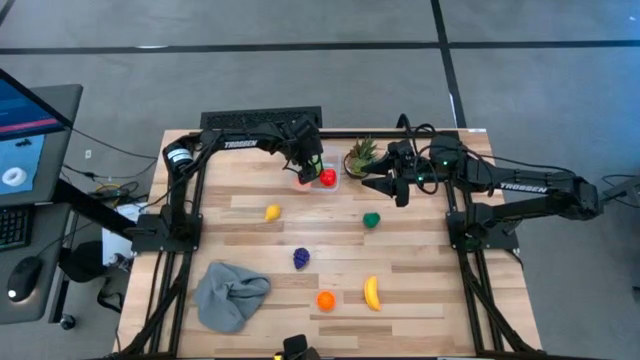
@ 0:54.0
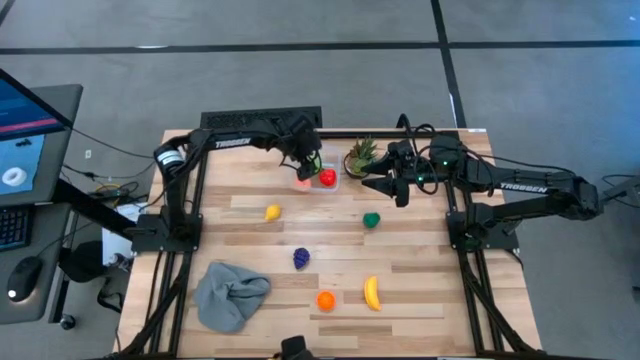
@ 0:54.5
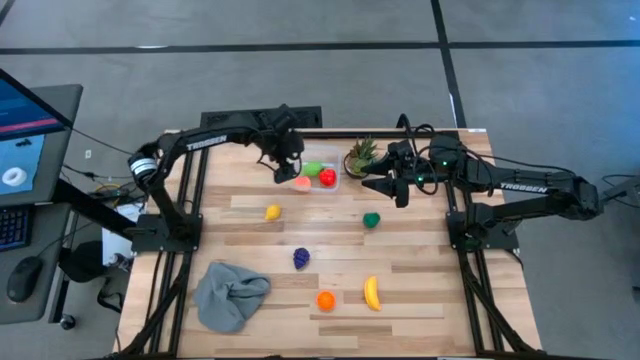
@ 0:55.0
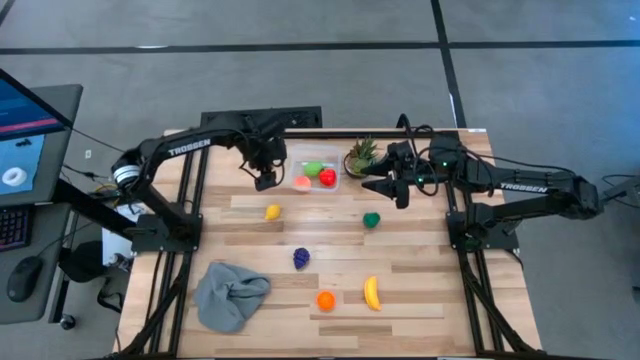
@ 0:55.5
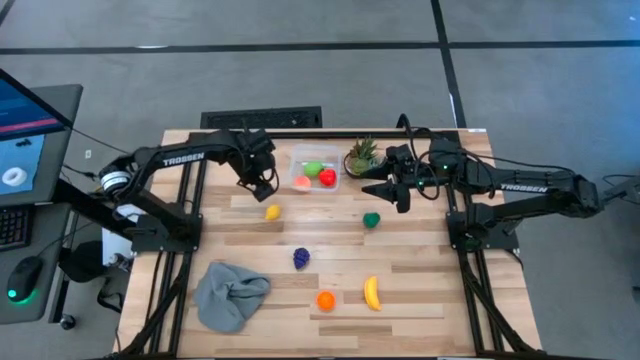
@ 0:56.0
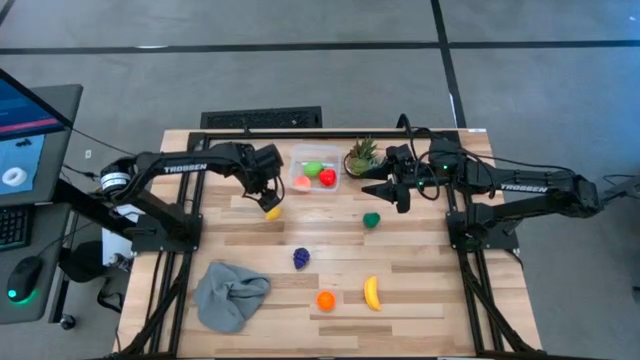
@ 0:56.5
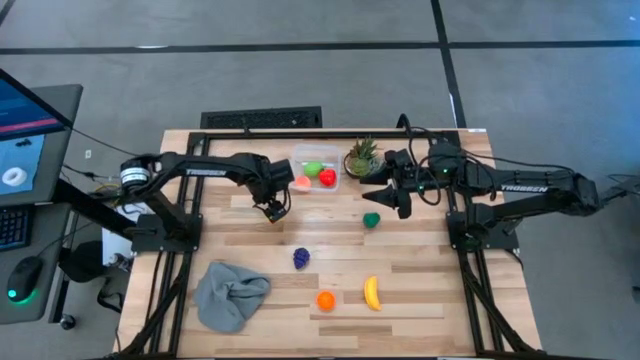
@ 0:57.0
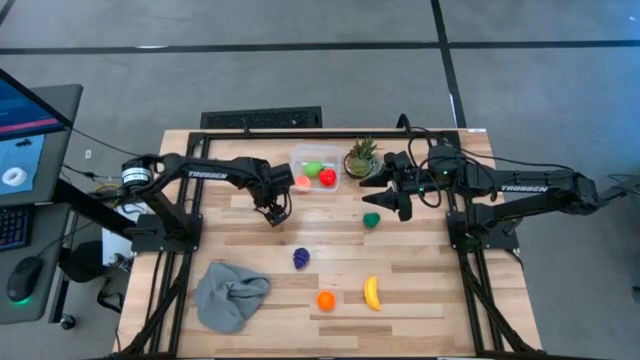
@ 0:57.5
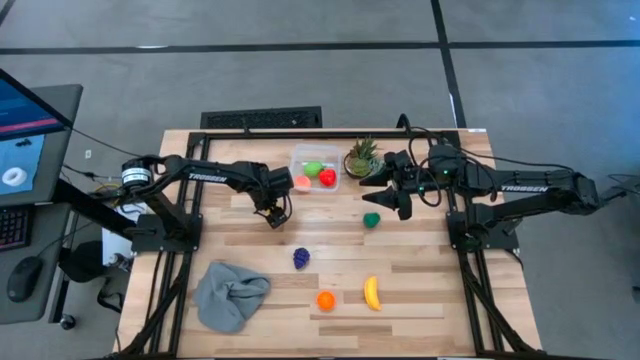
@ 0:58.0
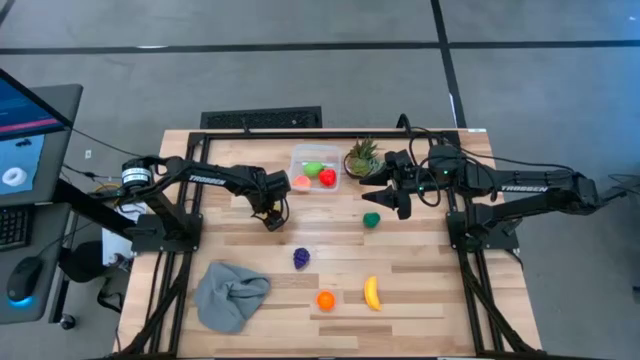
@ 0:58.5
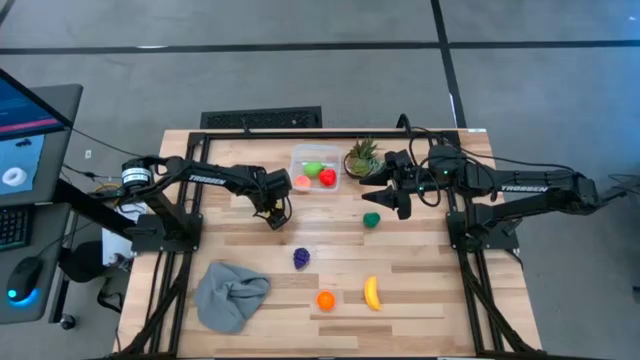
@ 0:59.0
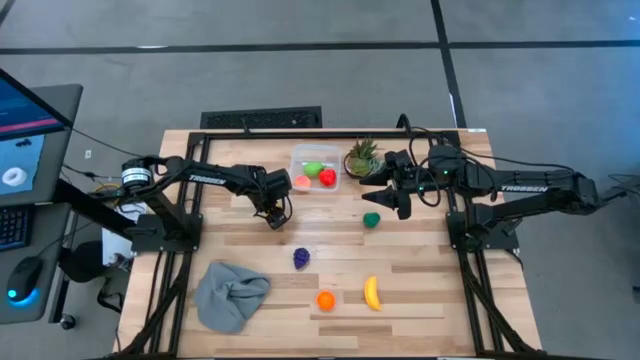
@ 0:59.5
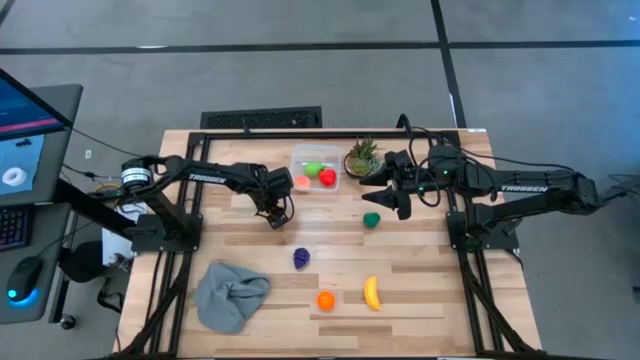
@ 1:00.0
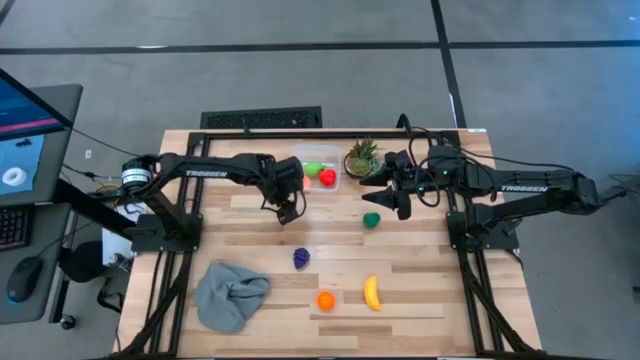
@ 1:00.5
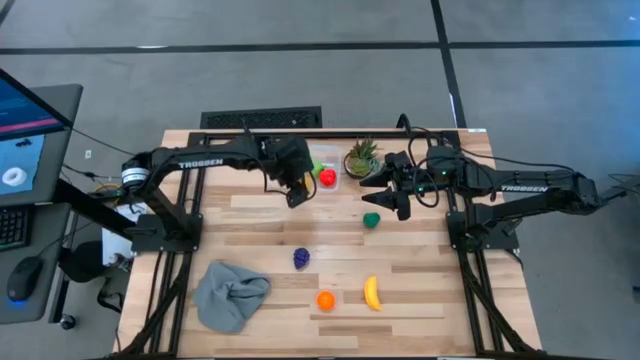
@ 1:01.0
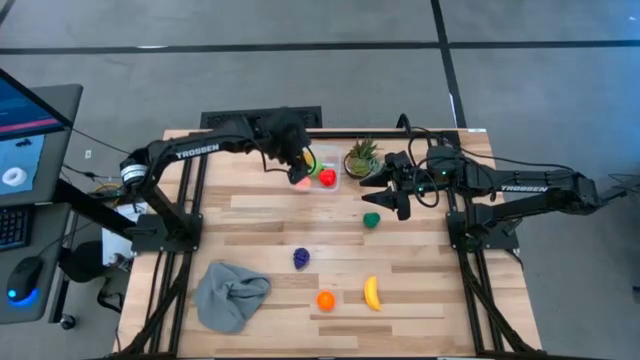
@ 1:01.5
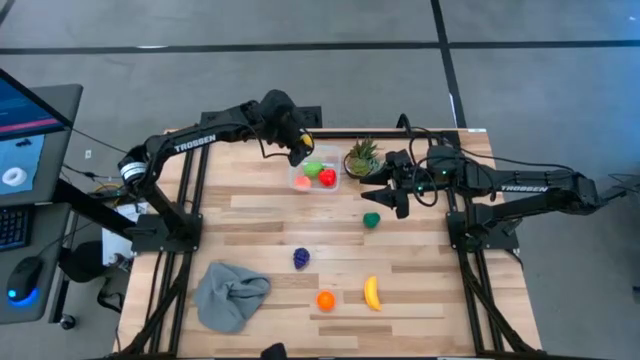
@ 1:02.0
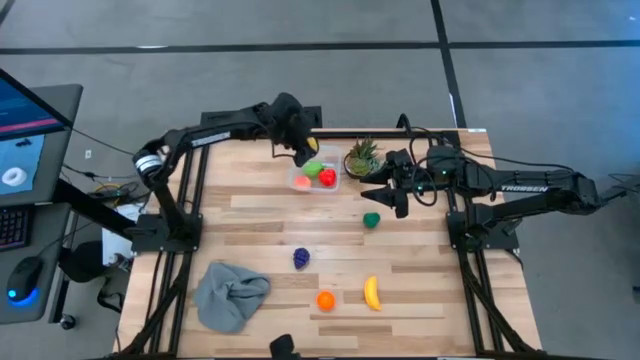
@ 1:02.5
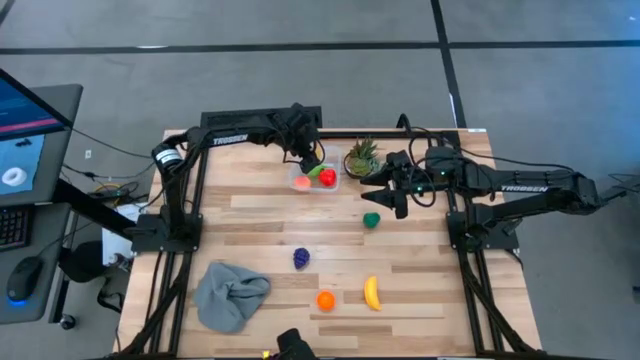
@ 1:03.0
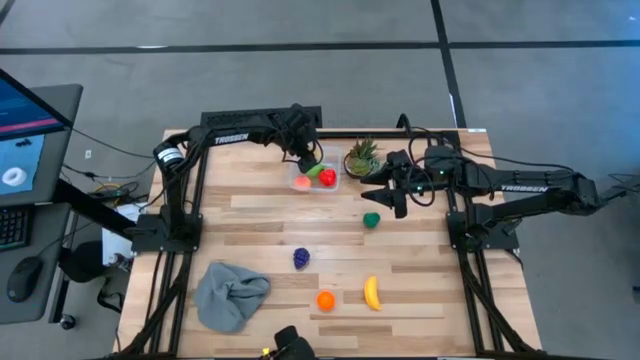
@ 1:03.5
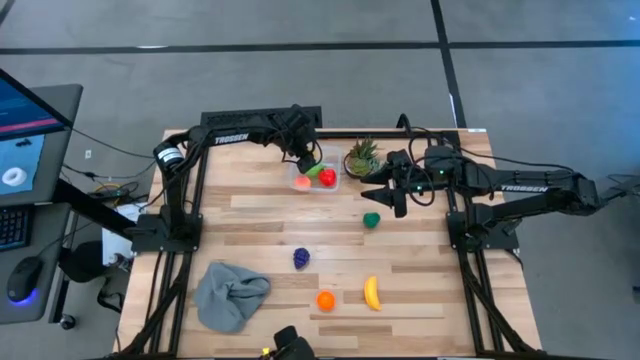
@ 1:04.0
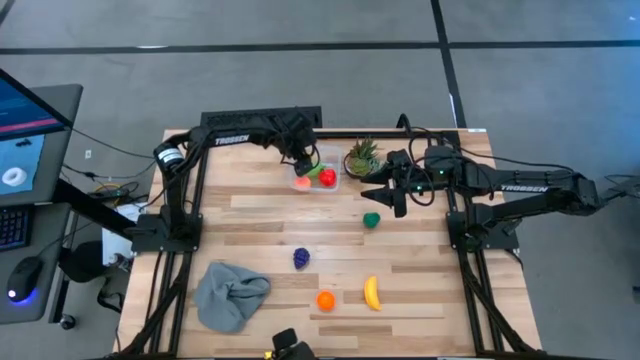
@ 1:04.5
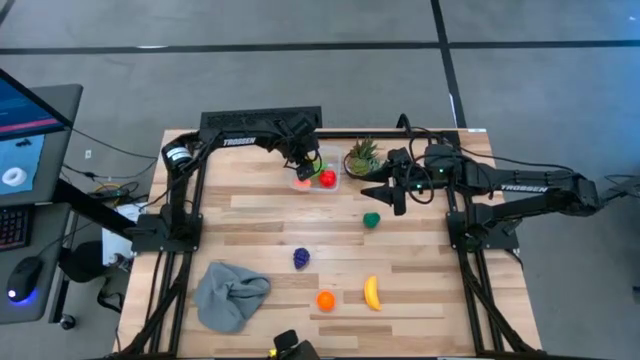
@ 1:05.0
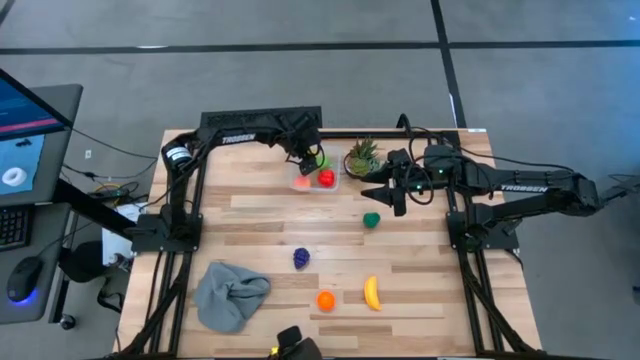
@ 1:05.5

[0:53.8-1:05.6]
Task: Pick and placing Produce into tupperware
Put the yellow lemon into the transparent container

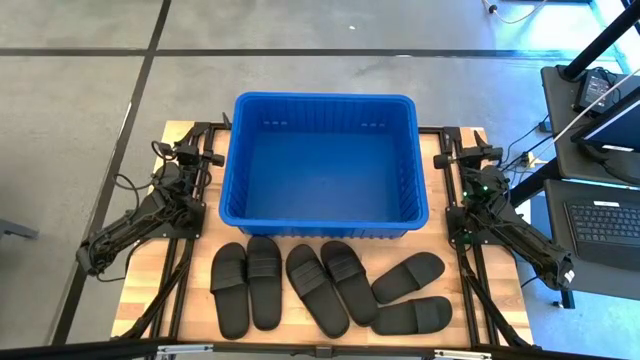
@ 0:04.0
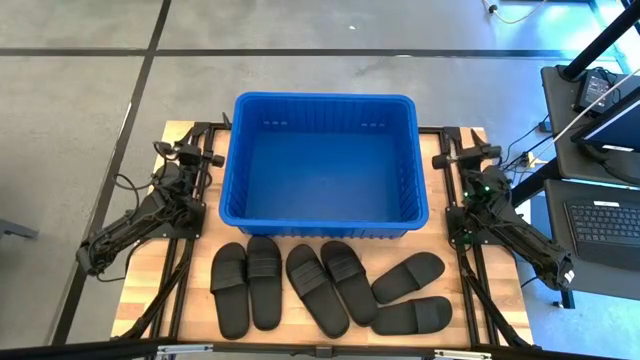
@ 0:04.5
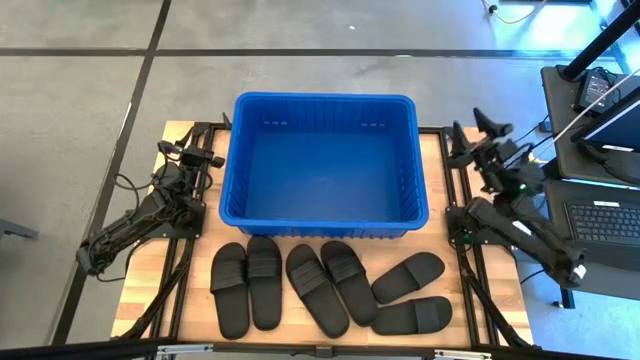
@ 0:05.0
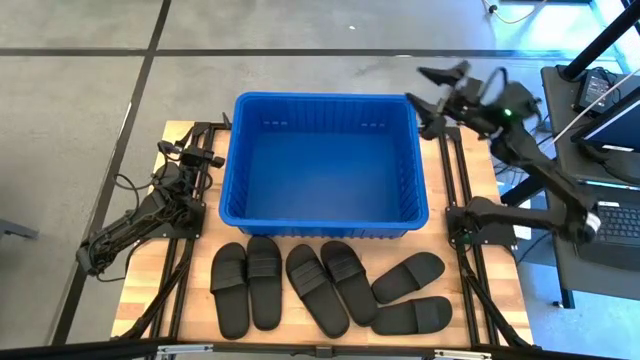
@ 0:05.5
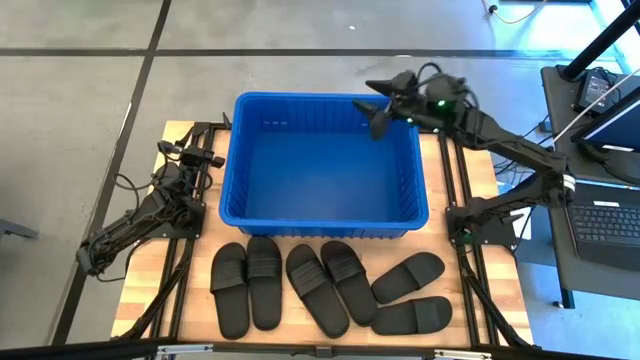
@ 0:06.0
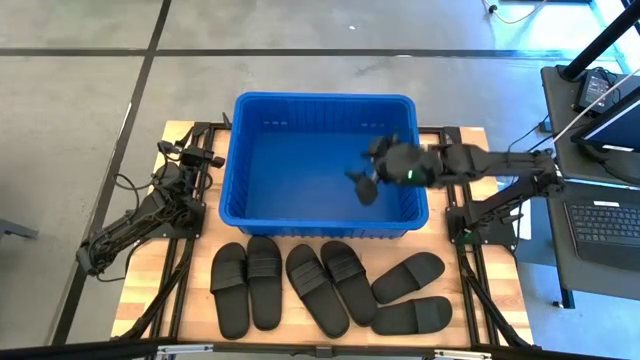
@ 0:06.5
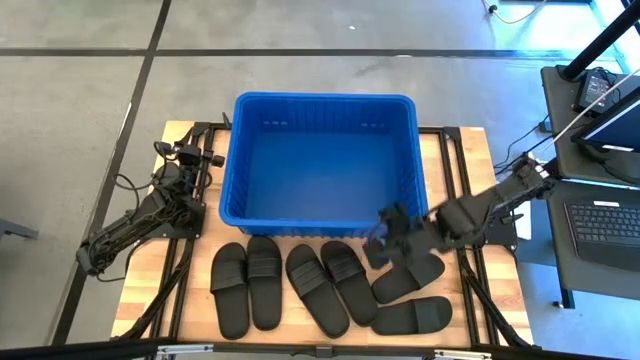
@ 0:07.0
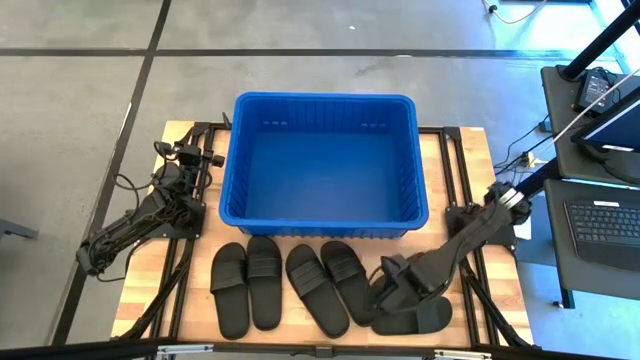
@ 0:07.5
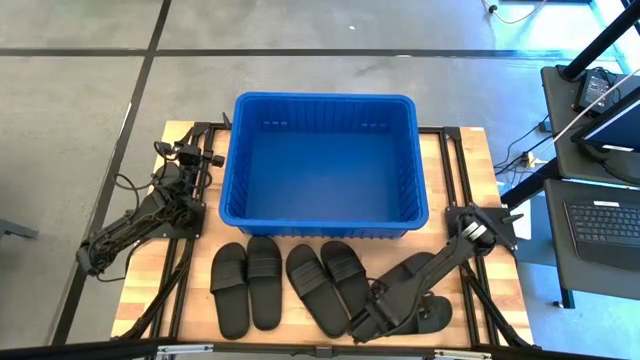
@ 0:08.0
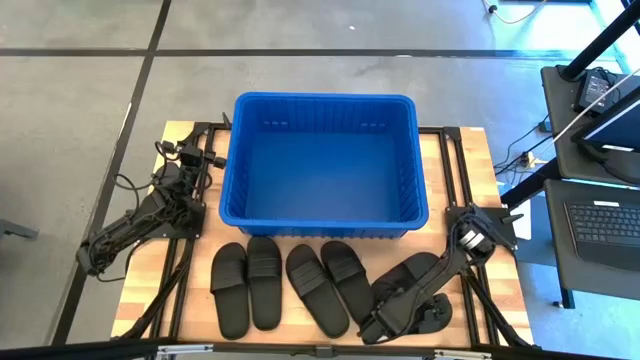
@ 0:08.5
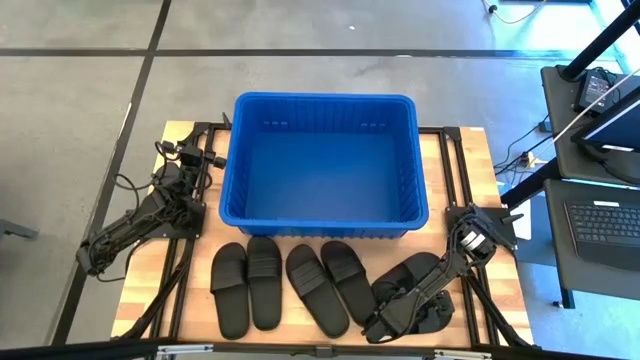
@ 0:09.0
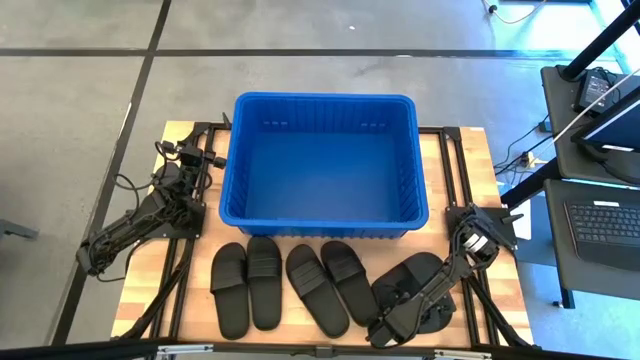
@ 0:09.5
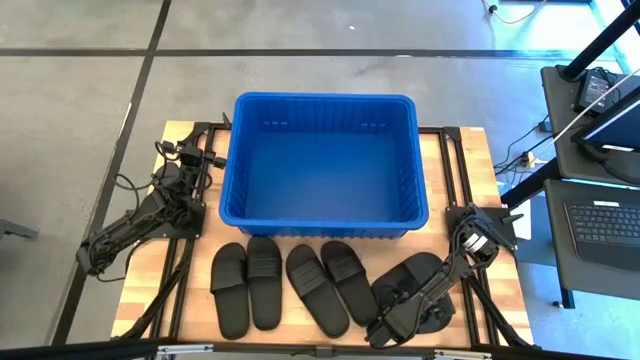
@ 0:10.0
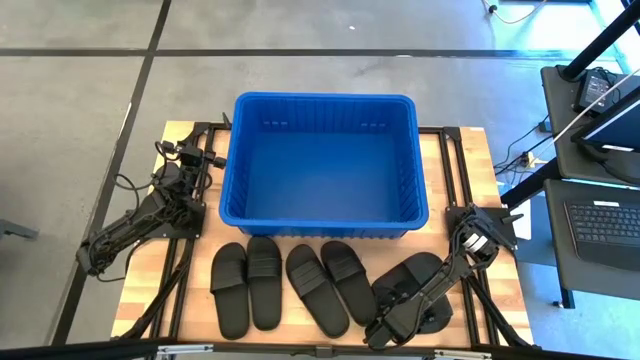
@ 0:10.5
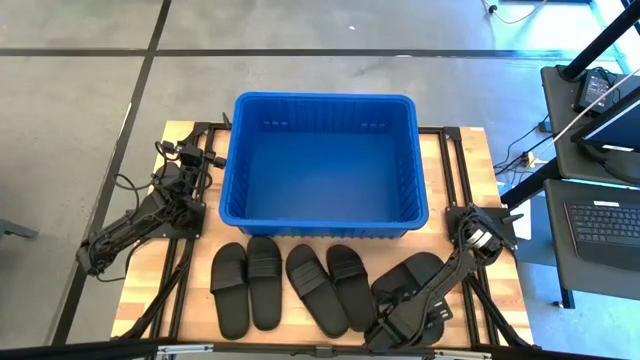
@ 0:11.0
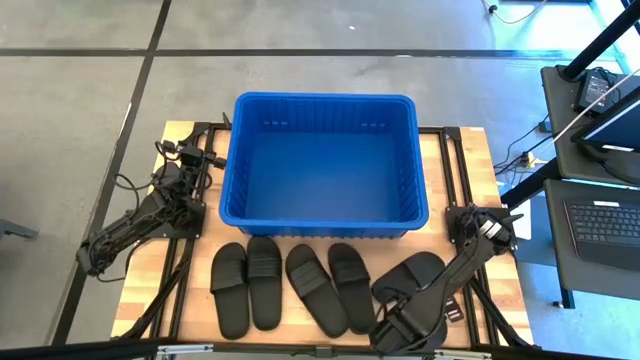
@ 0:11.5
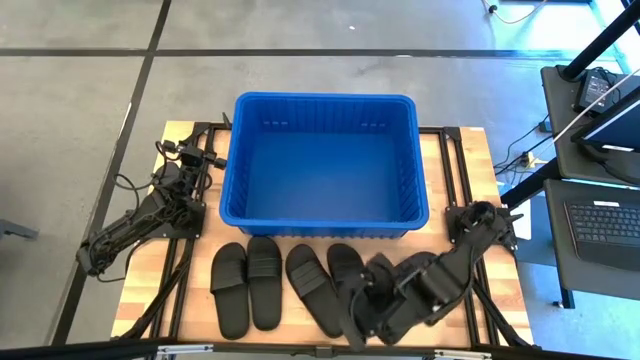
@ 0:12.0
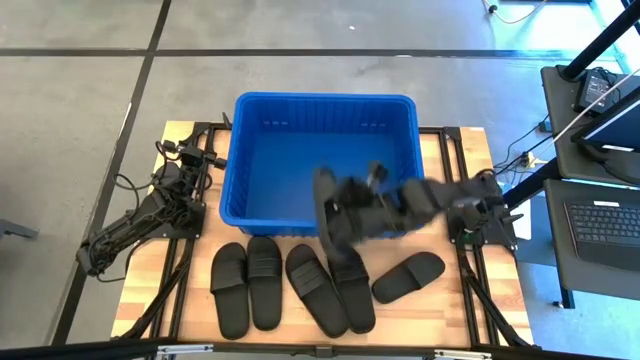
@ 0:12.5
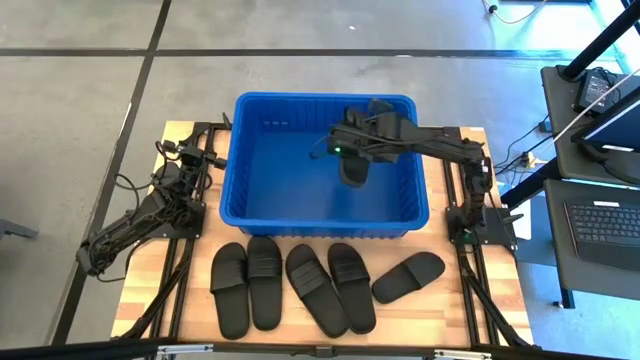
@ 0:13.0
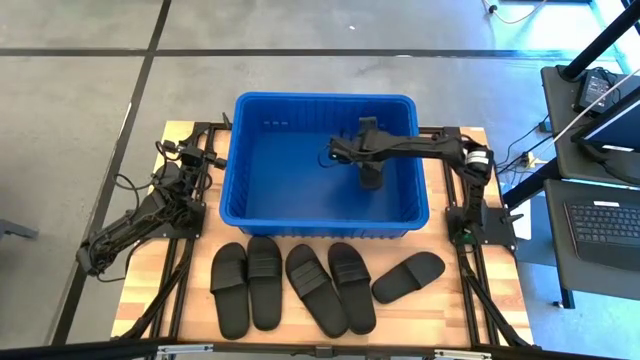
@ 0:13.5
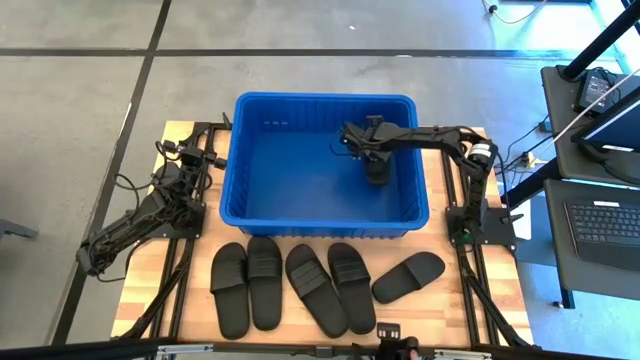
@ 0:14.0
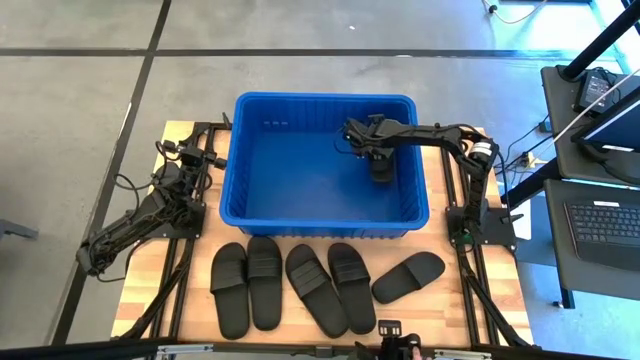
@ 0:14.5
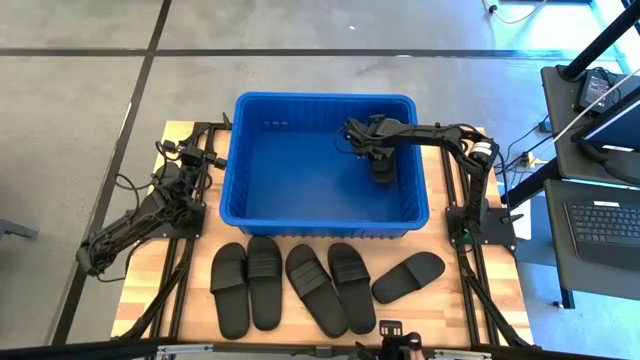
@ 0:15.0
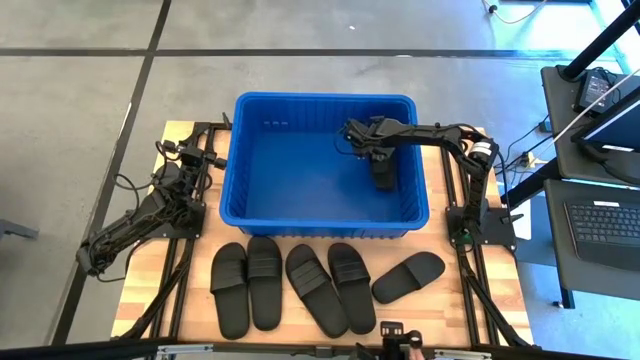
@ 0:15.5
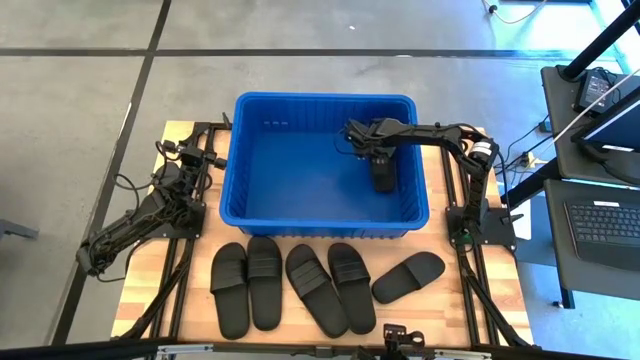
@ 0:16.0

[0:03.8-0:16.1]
Task: Pick and place slides into bin
Put the black slide into the blue organizer bin
